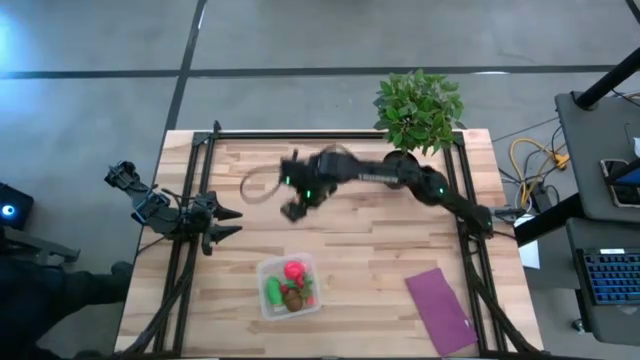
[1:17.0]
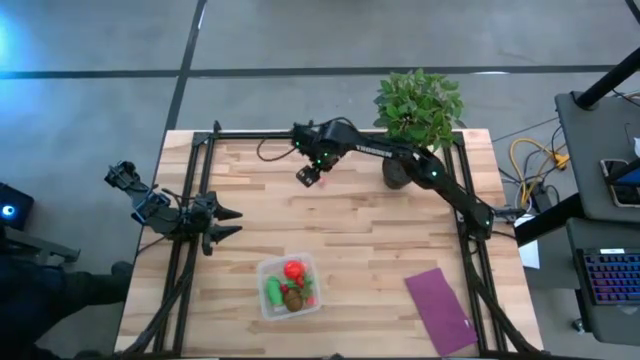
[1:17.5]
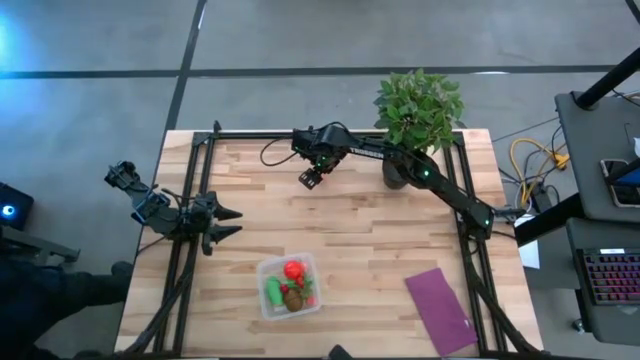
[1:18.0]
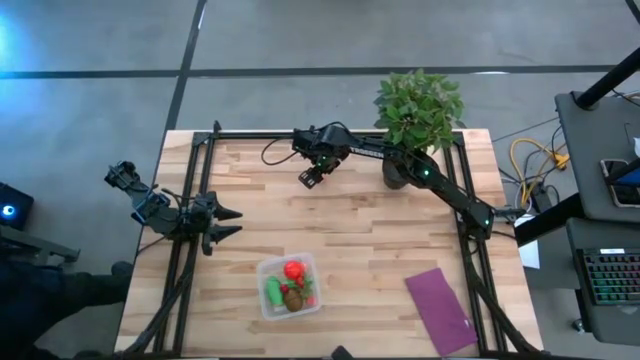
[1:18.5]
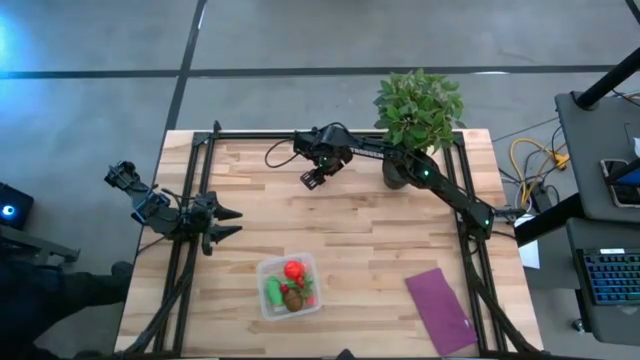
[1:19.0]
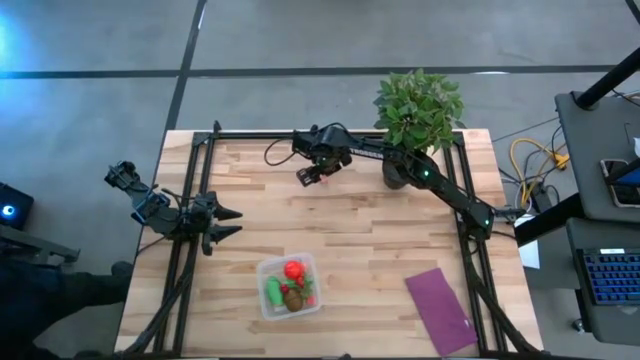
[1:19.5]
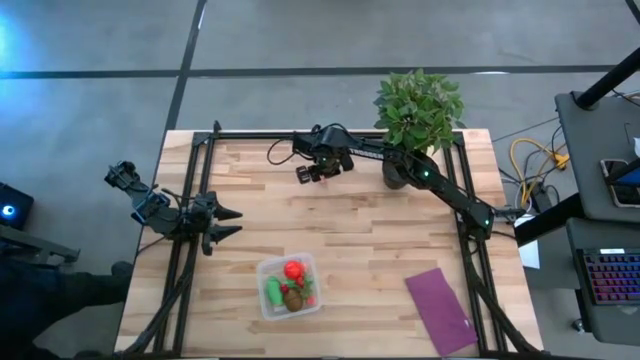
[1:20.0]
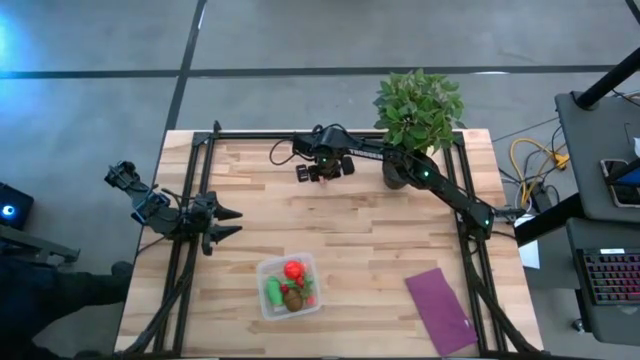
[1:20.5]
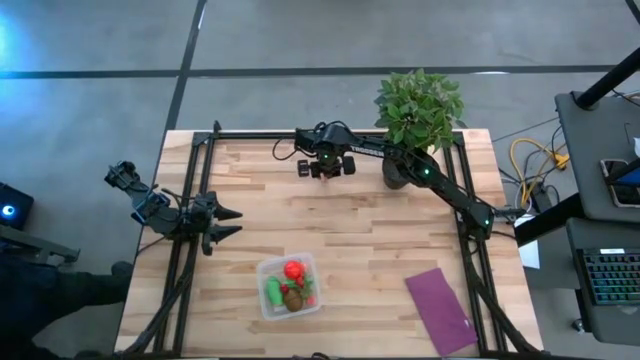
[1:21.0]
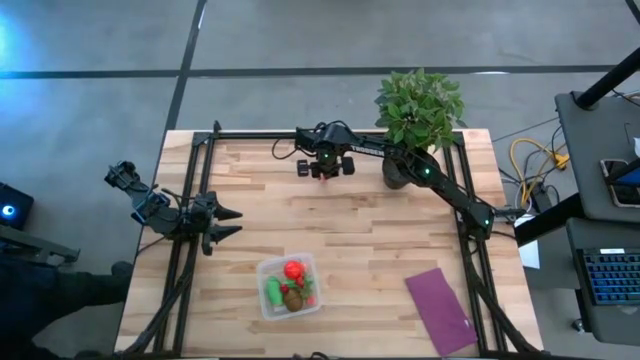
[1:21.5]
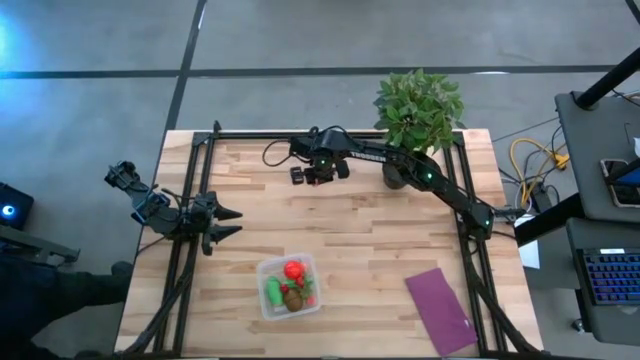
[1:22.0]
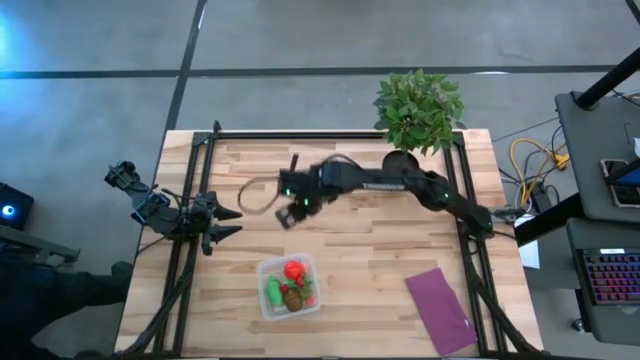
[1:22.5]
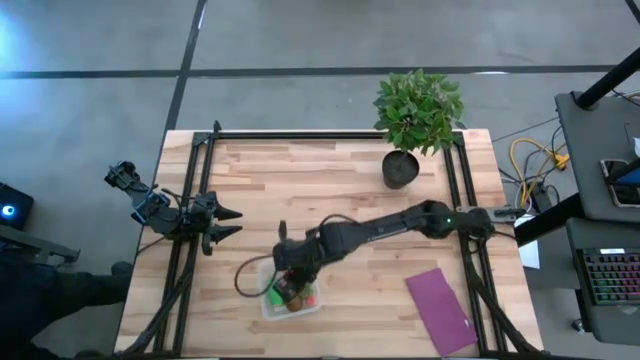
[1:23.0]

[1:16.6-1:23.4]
Task: Pick and placing Produce into tupperware
Put the peach into the transparent bin

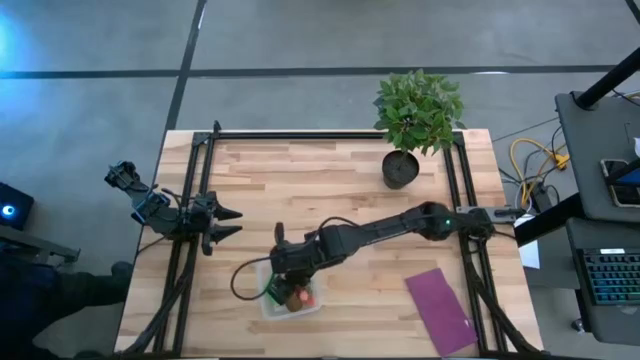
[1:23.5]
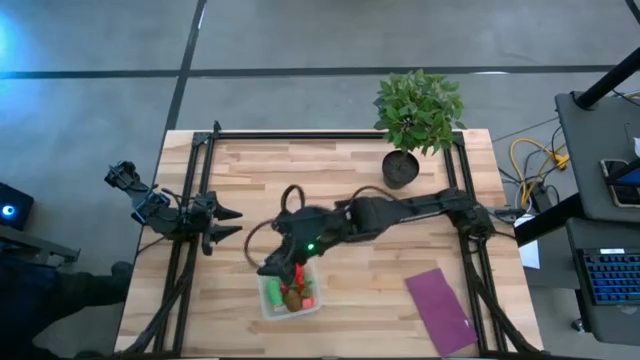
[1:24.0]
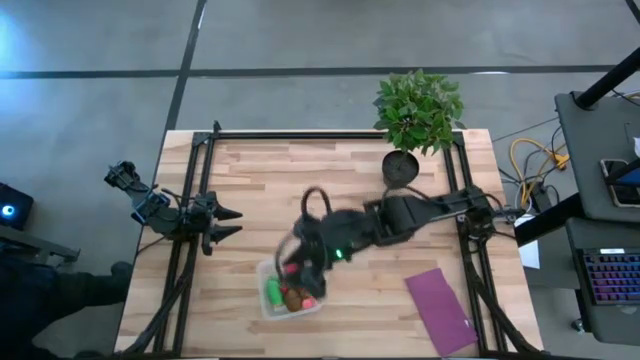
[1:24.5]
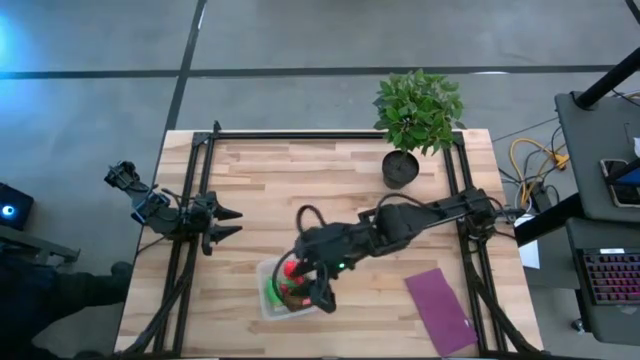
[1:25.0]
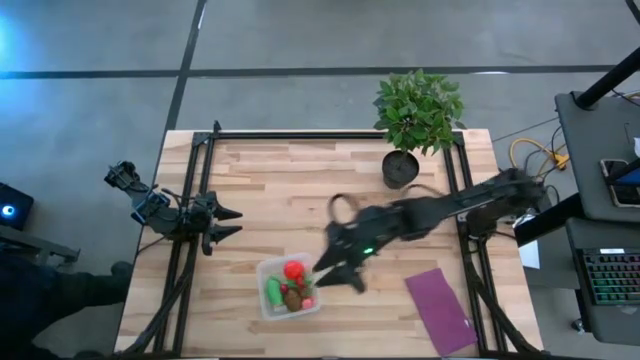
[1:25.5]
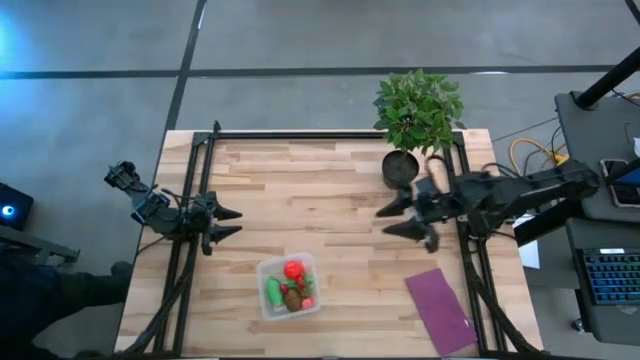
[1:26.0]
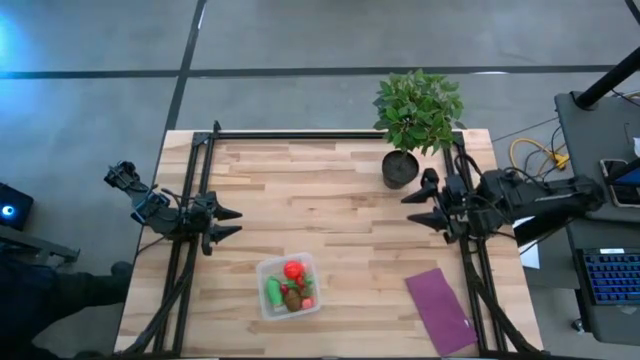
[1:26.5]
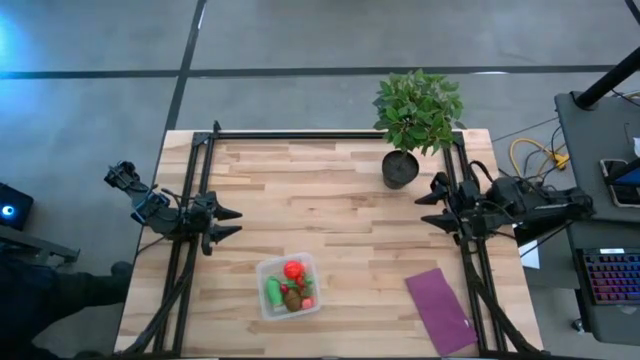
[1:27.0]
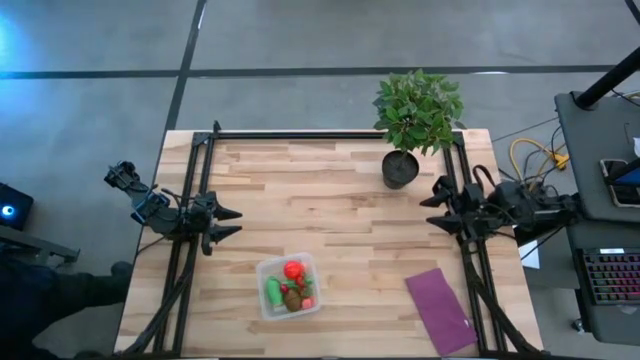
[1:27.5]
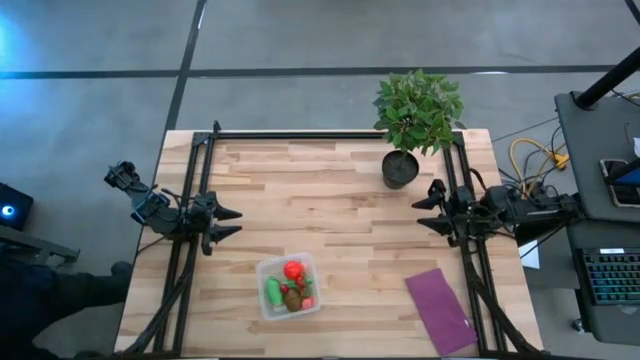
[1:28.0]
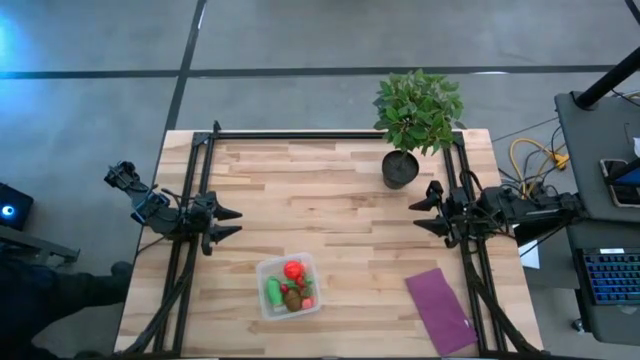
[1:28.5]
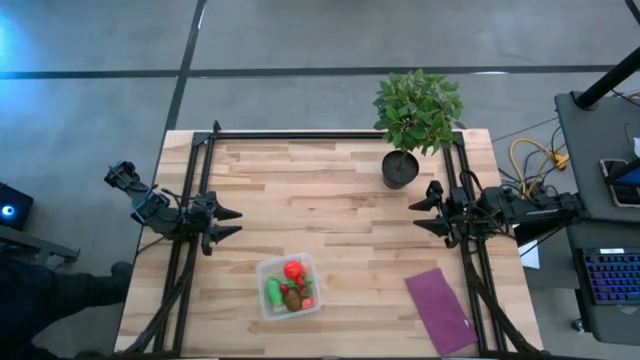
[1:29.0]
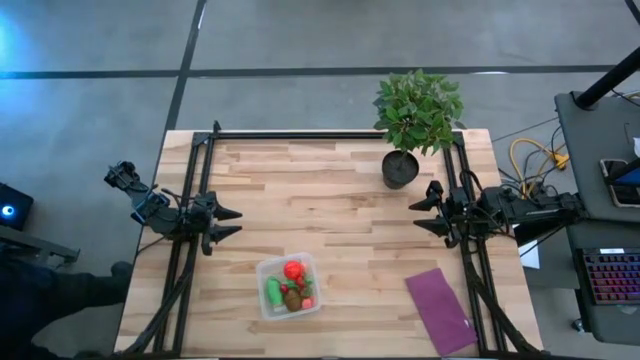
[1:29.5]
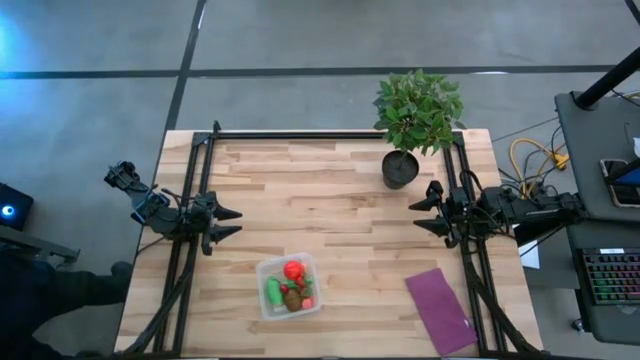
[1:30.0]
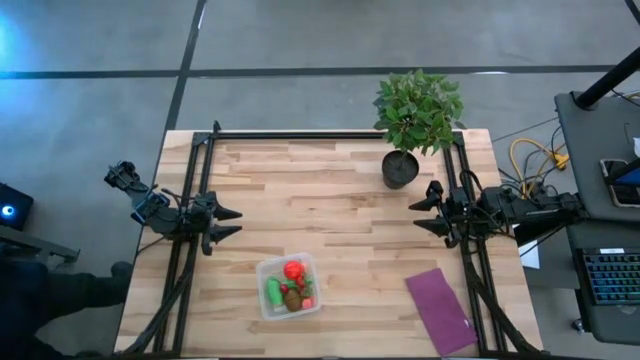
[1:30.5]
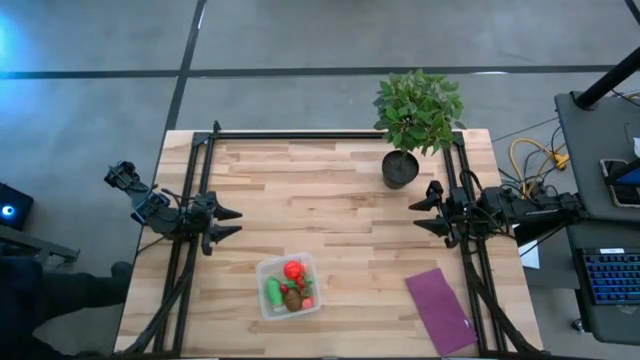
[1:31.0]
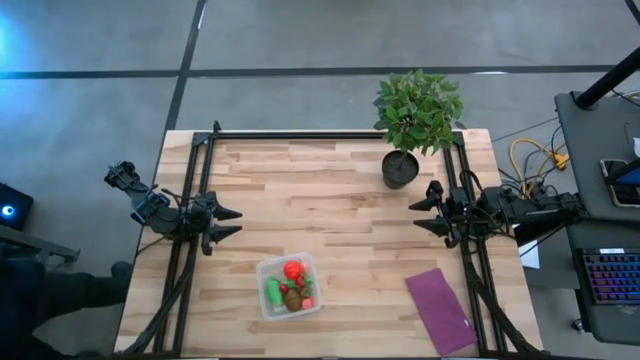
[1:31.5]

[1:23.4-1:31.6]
Return to Home Position

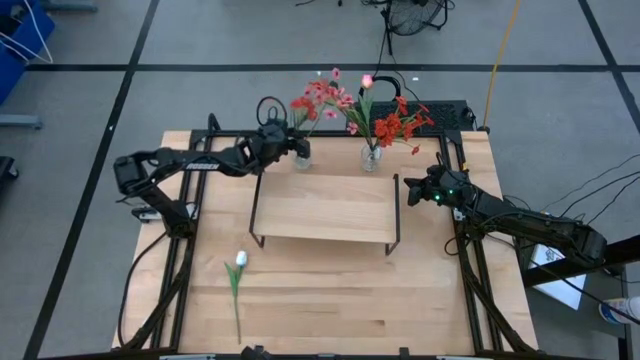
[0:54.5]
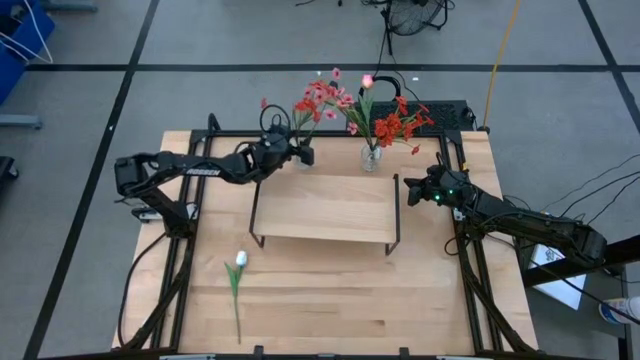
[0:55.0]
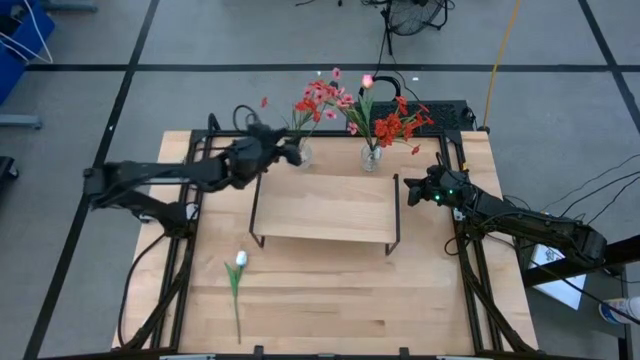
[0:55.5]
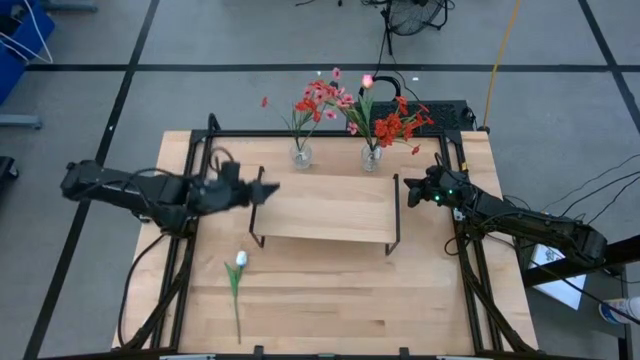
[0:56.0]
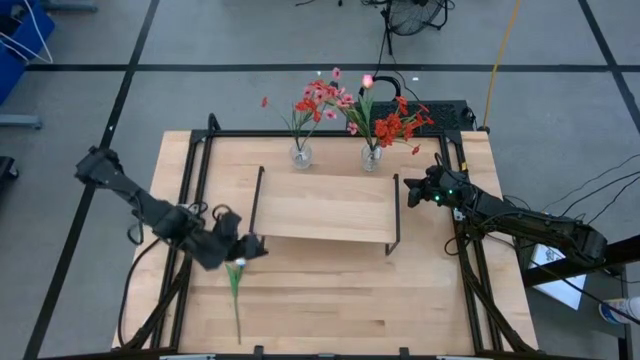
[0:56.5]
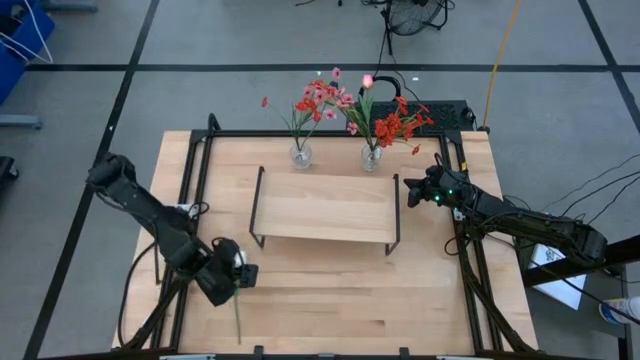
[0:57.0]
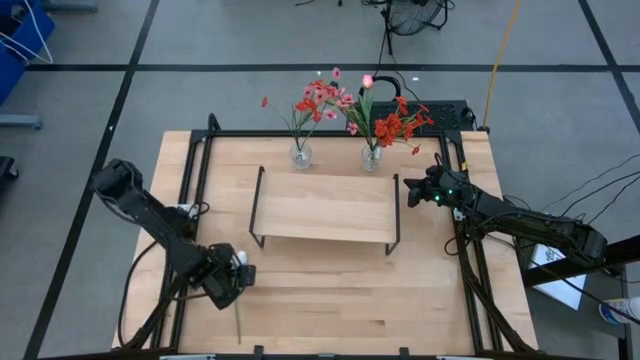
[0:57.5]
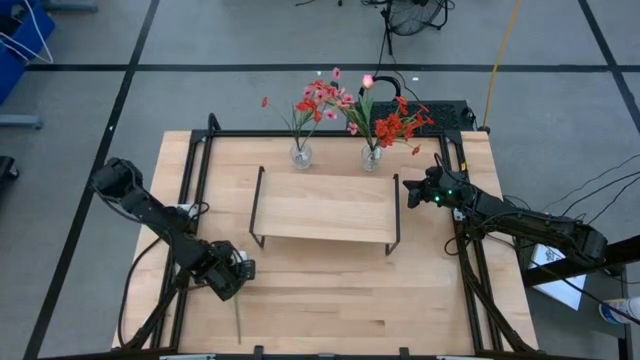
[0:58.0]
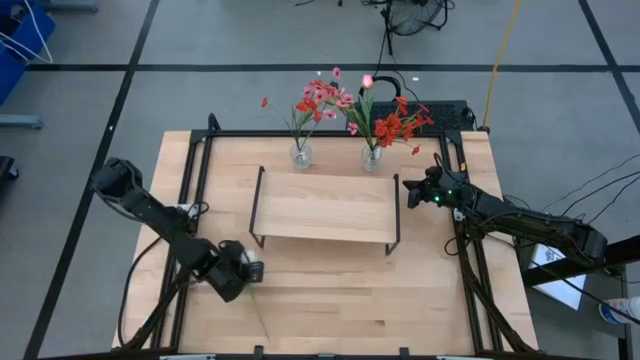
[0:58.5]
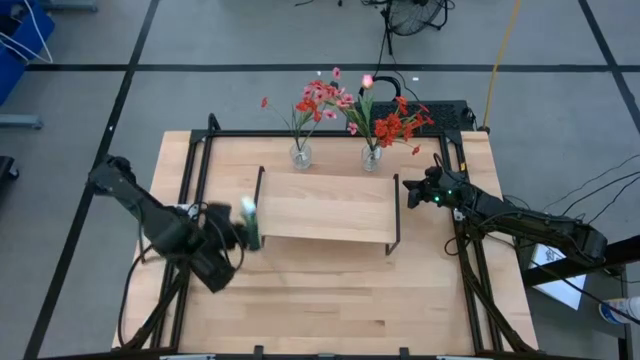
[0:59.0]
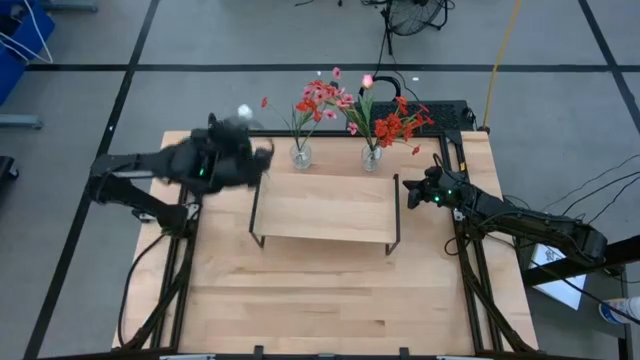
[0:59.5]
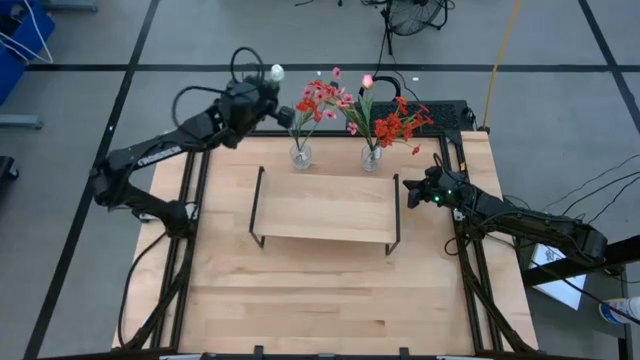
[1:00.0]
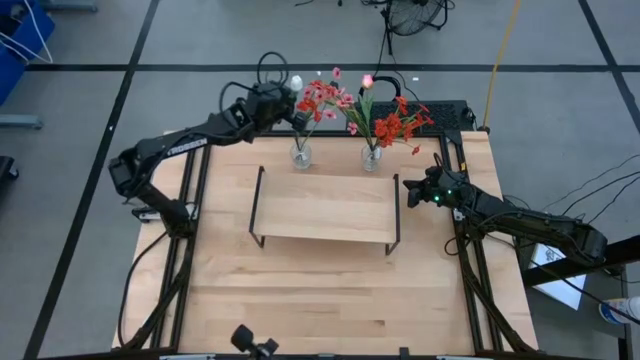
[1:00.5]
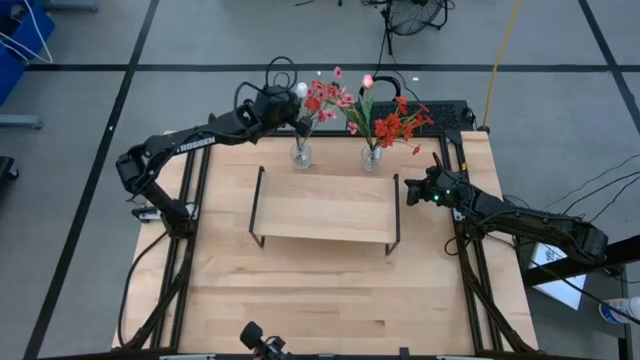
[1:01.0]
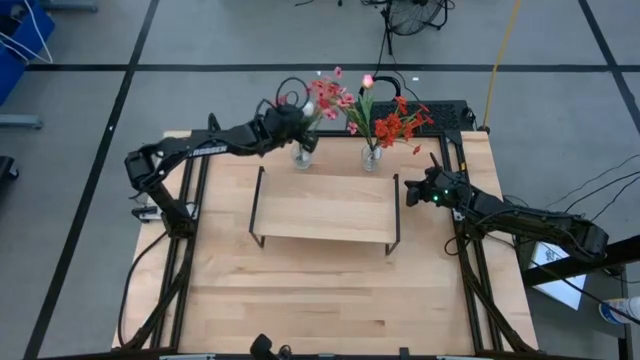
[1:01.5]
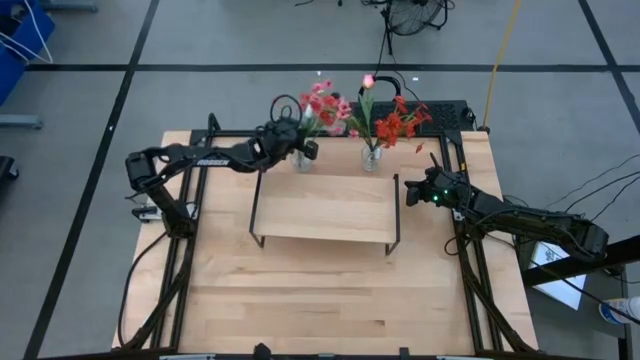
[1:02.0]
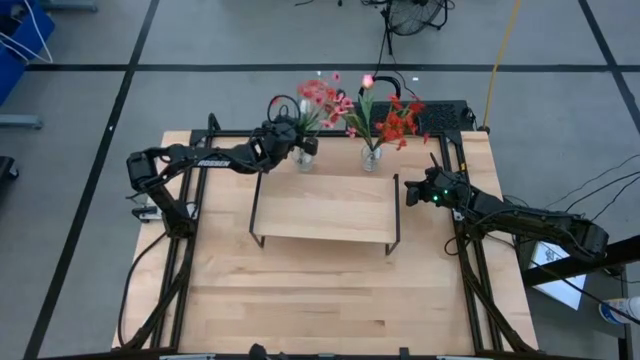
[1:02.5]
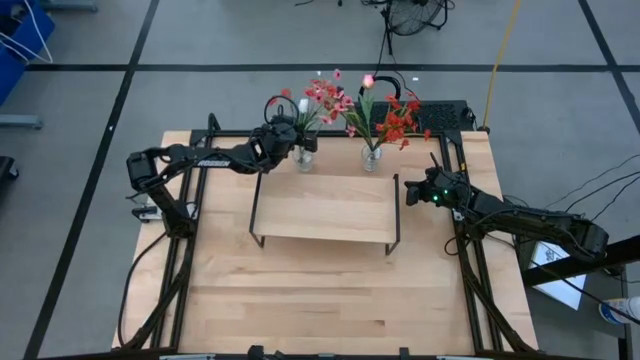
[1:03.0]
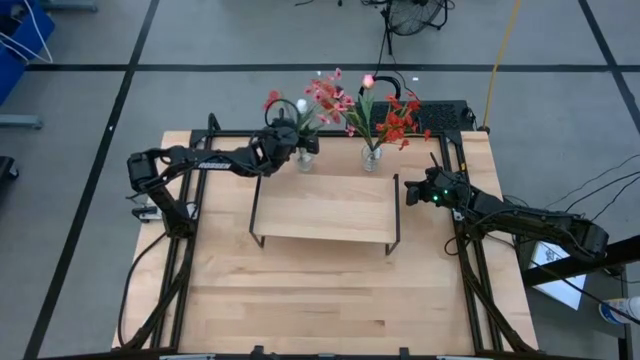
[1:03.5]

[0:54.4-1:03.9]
Task: Pick and place flowers into a vace then onto a shelf
Put the white tulip into the left transparent flower vase
